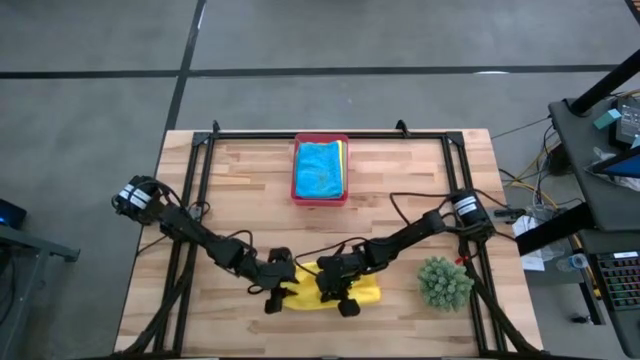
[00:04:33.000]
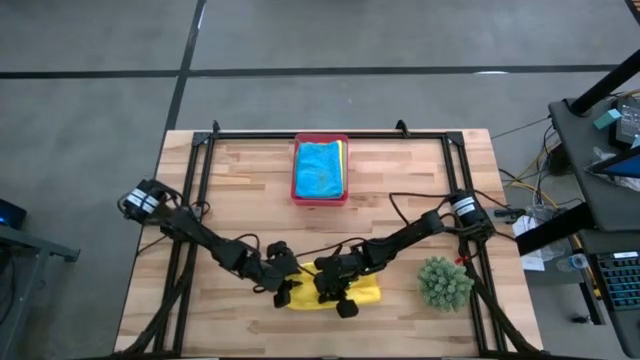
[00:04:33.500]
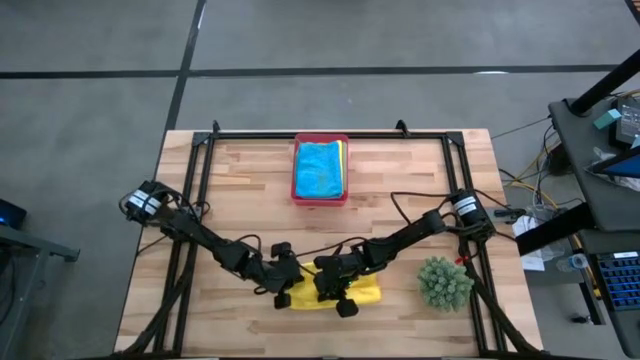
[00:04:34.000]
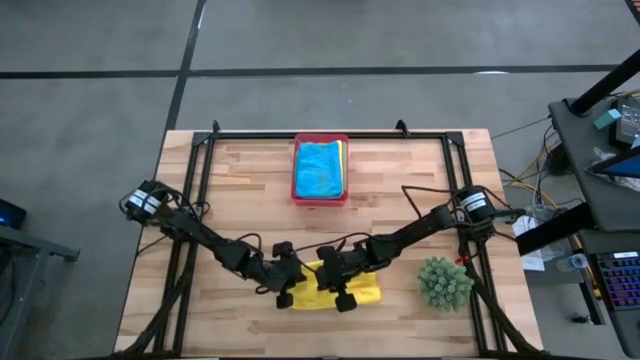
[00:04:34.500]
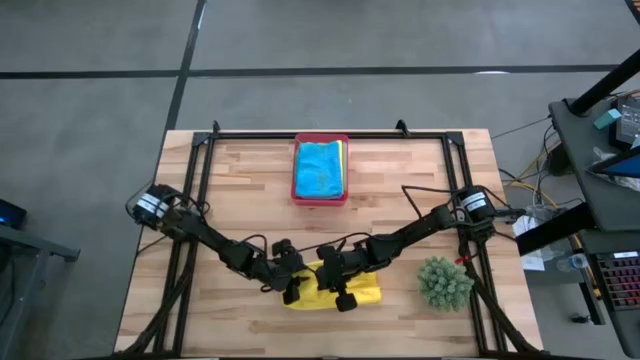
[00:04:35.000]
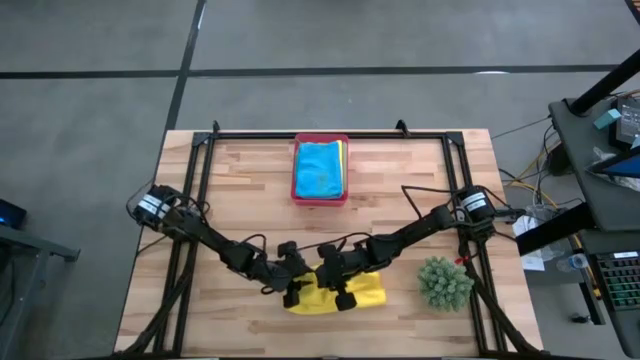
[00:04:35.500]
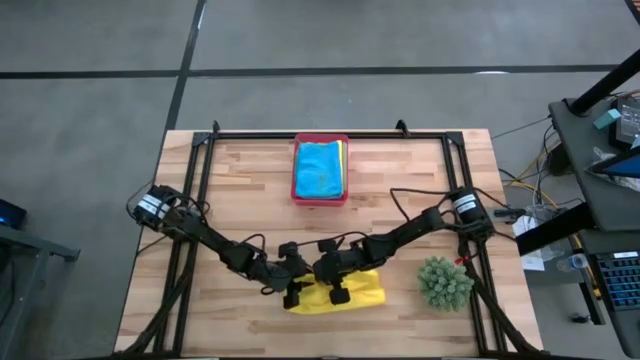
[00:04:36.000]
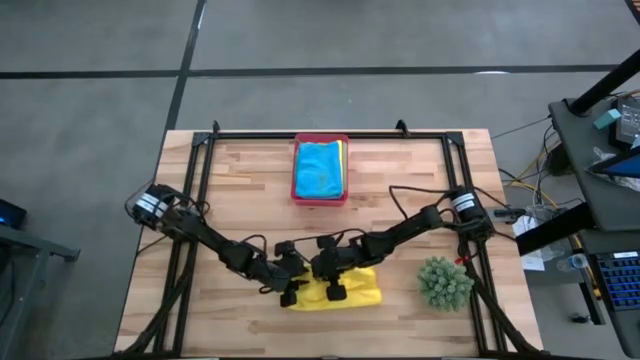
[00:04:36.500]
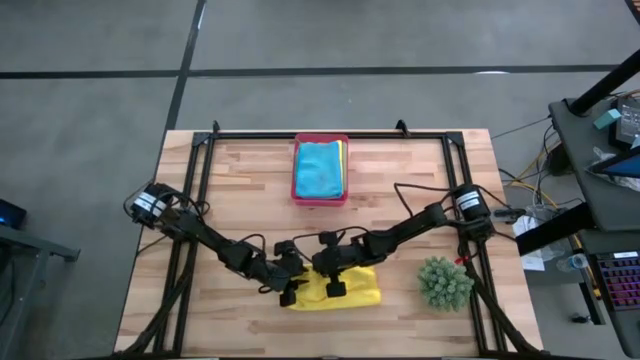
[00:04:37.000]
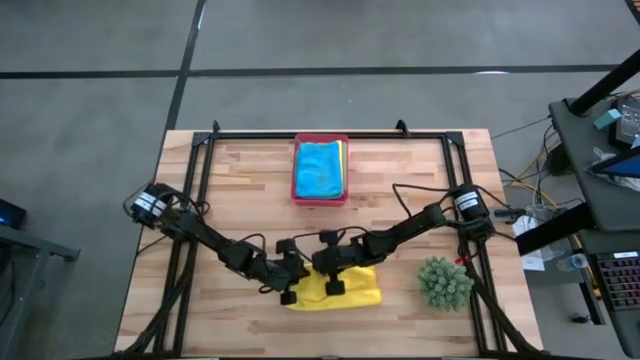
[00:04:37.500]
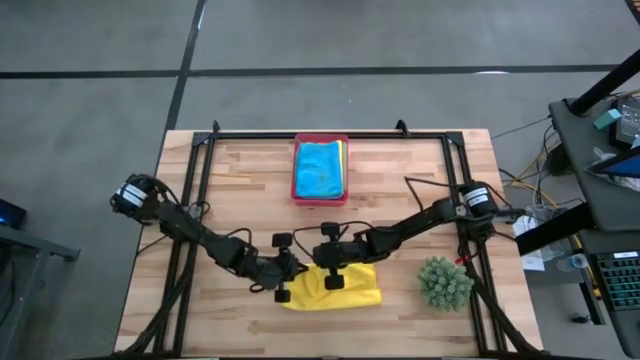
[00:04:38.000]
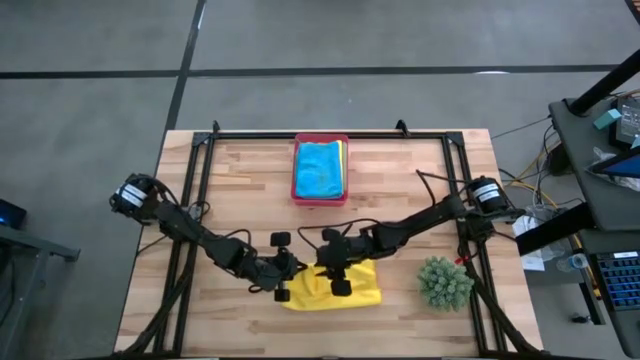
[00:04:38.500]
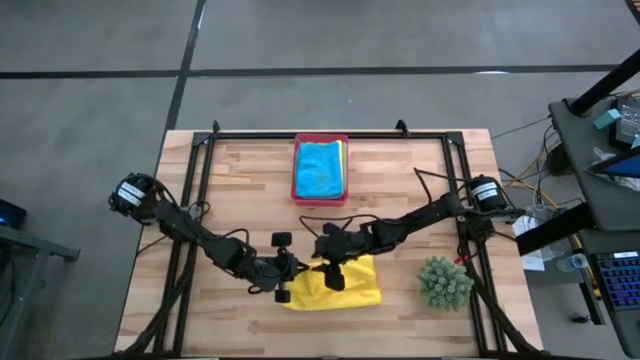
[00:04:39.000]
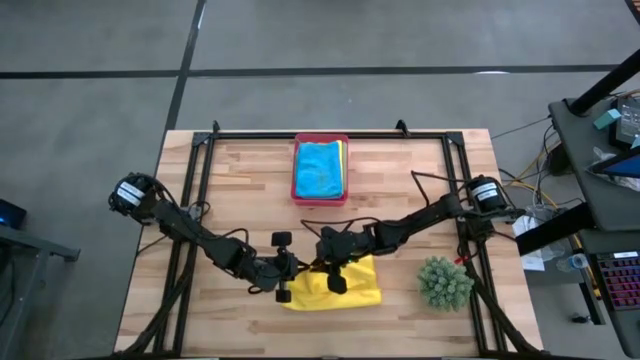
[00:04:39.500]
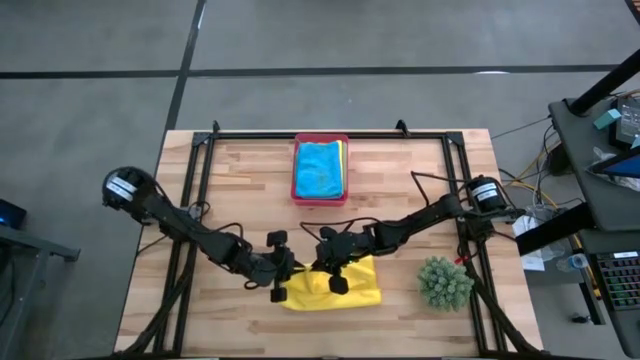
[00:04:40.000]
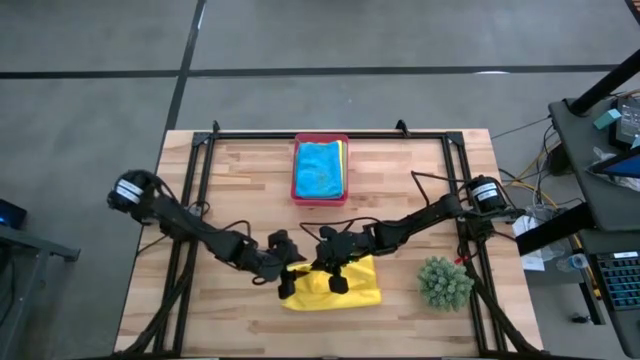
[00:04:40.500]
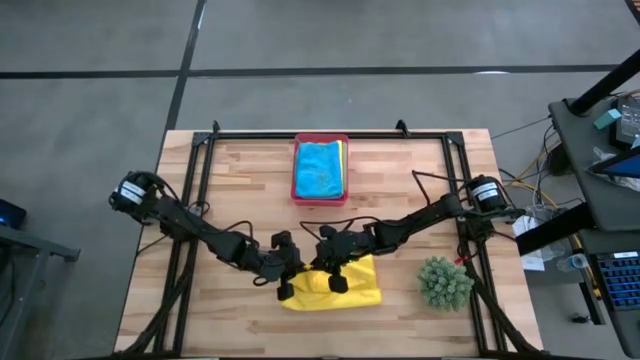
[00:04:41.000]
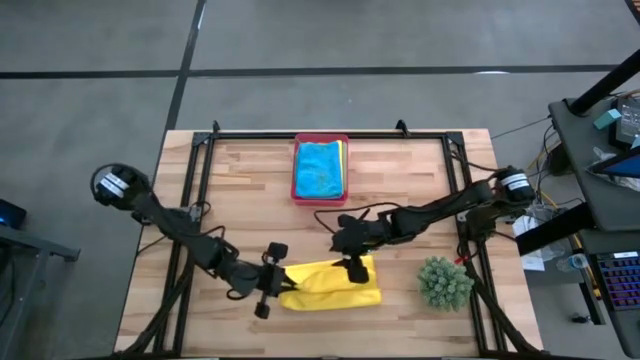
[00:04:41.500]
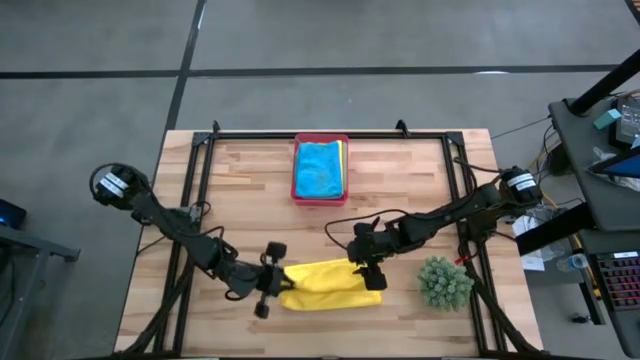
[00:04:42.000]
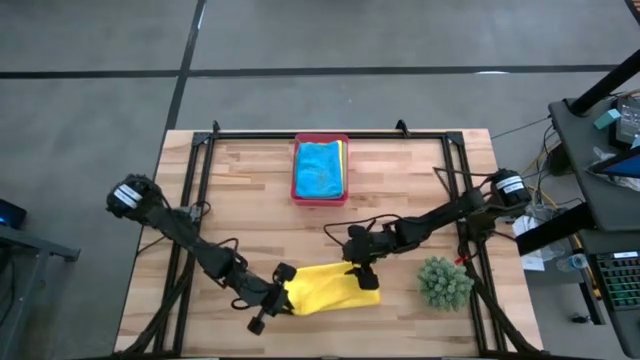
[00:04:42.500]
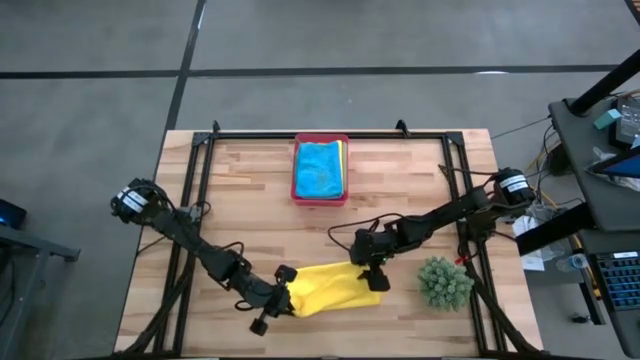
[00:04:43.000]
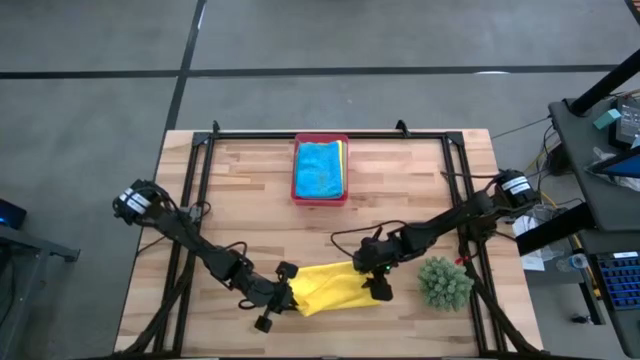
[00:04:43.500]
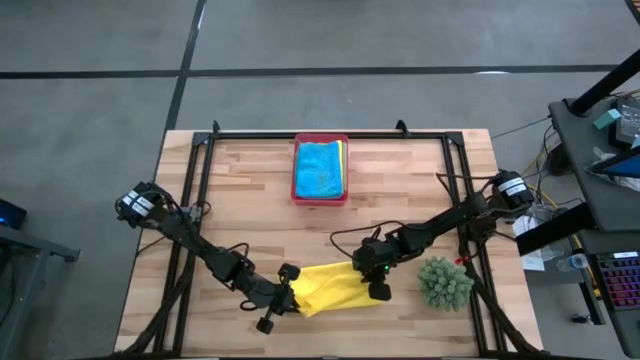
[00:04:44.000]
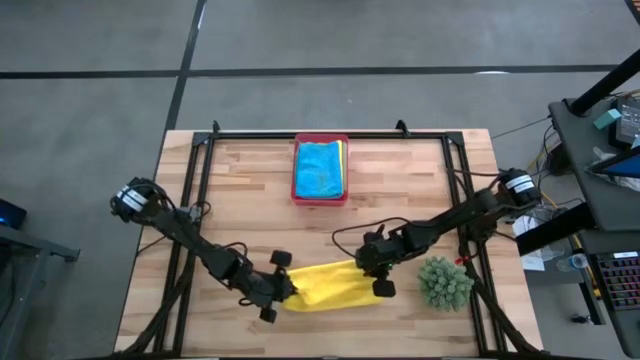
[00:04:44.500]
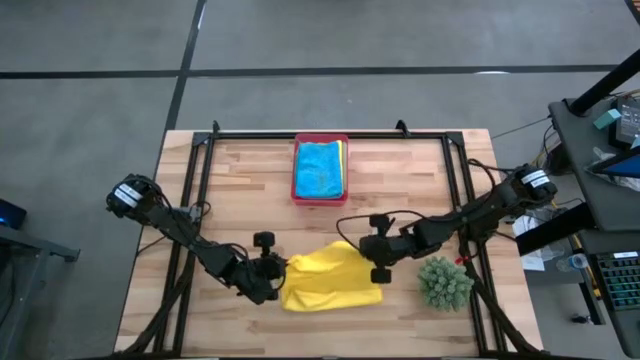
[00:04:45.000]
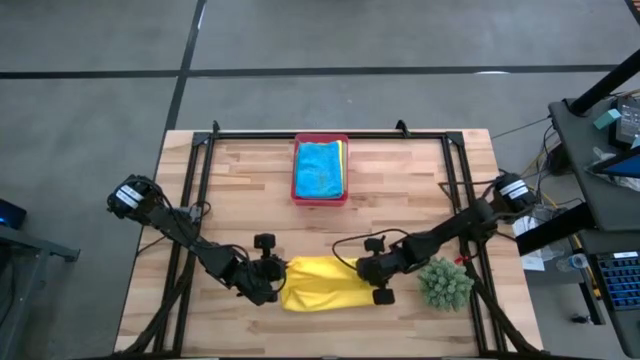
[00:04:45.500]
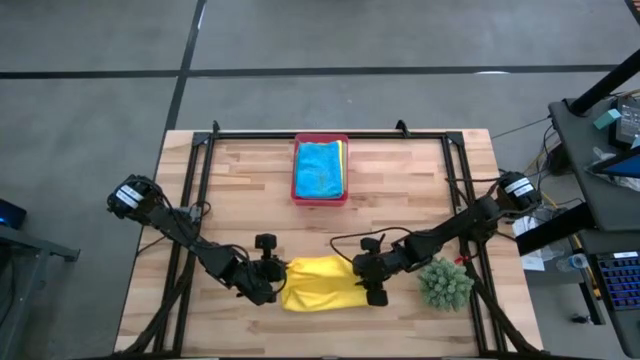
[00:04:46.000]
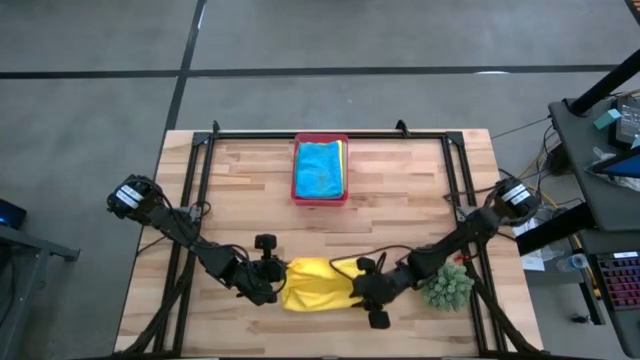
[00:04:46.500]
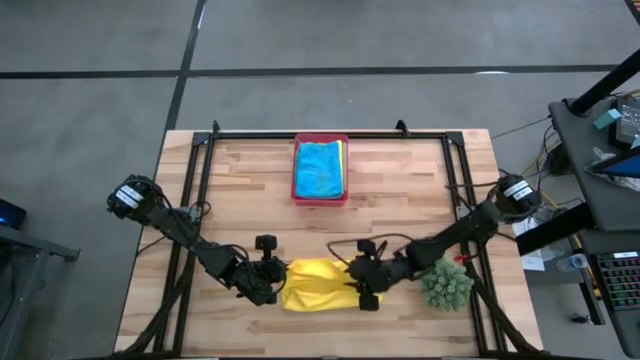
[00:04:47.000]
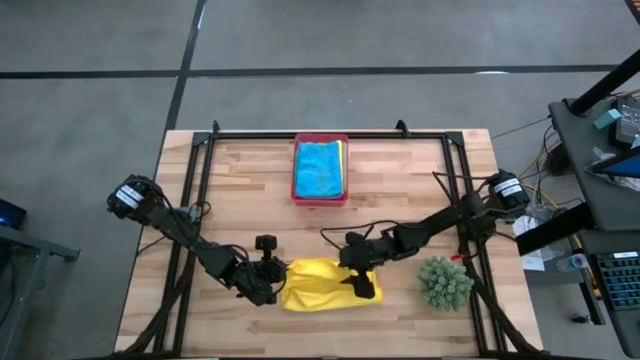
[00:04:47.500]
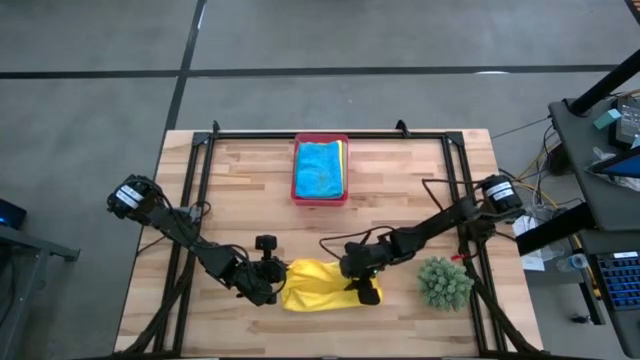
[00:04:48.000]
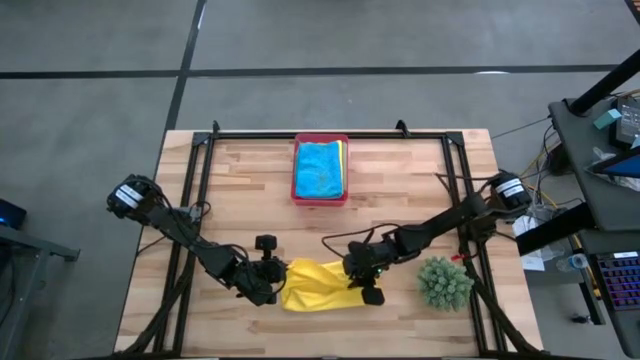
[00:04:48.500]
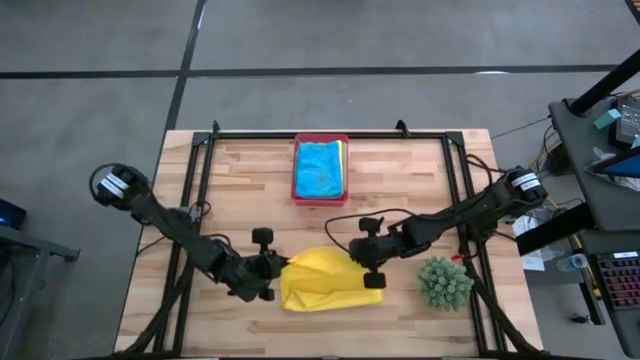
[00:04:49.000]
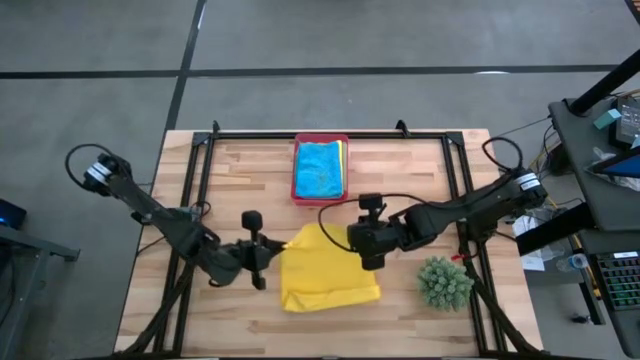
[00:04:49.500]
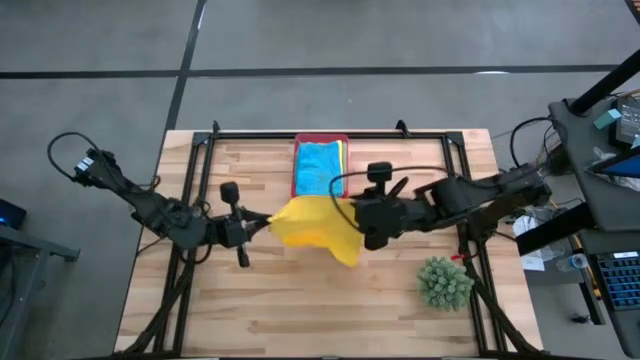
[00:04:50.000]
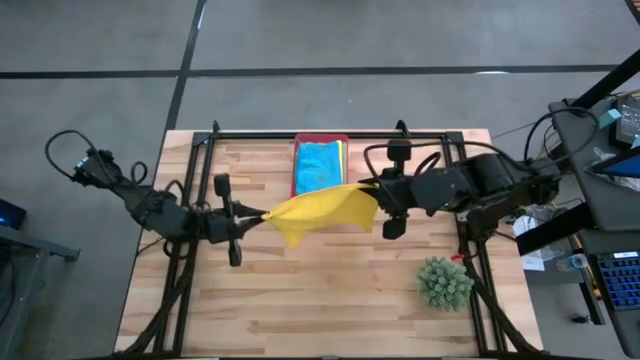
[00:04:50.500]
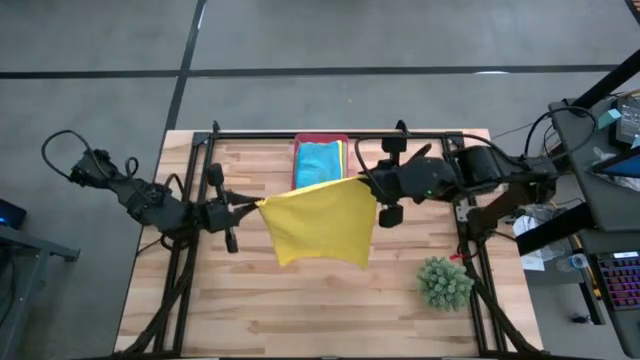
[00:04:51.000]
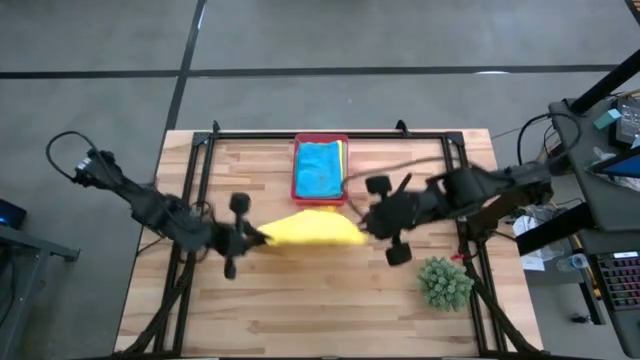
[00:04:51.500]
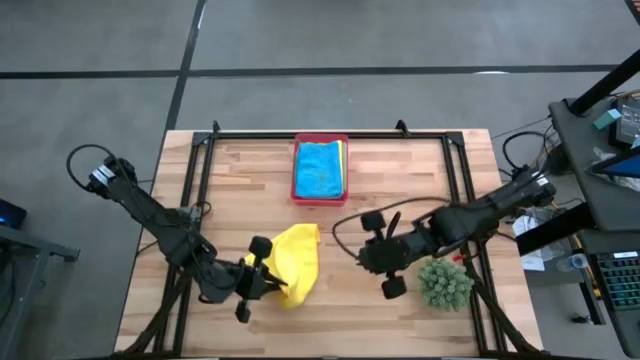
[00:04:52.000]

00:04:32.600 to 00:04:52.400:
Task: Fold microfiber towels
Fold the yellow towel
